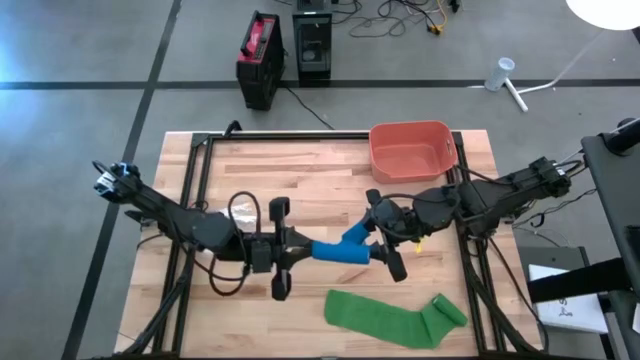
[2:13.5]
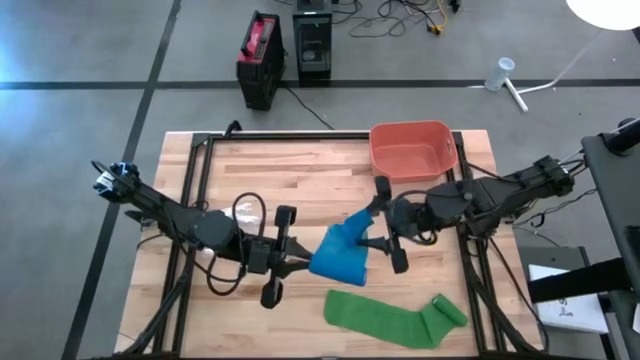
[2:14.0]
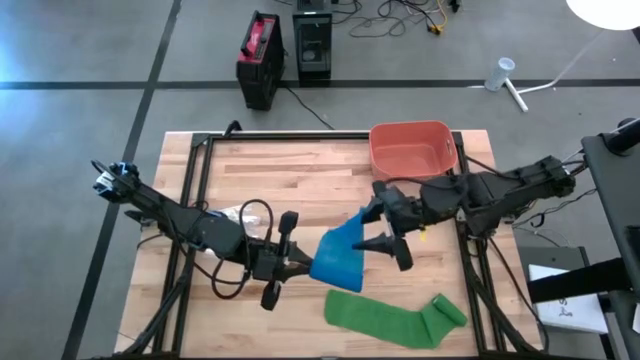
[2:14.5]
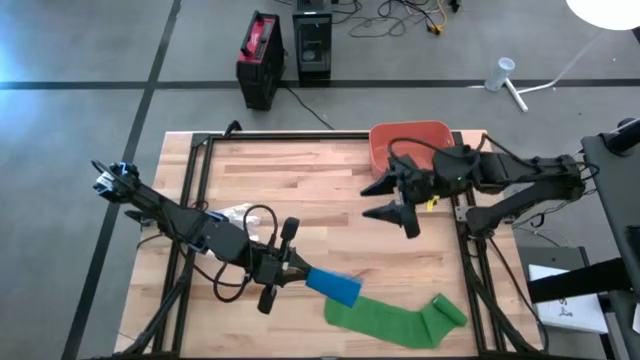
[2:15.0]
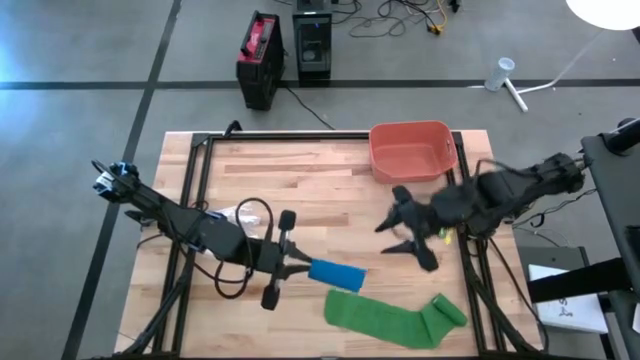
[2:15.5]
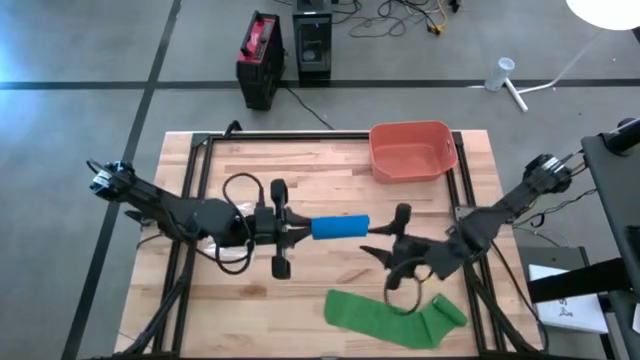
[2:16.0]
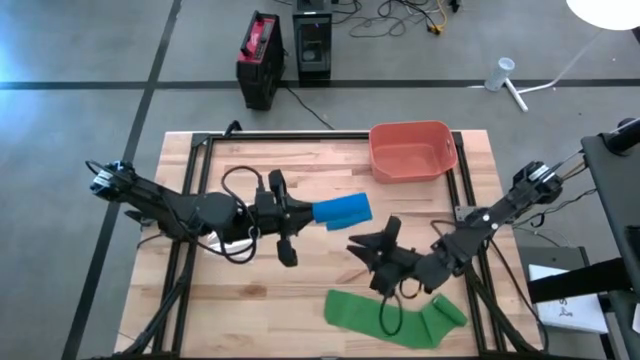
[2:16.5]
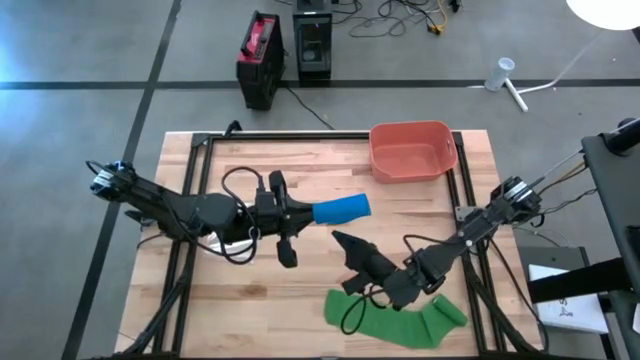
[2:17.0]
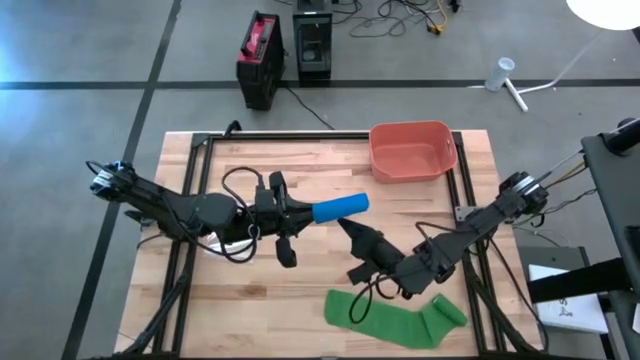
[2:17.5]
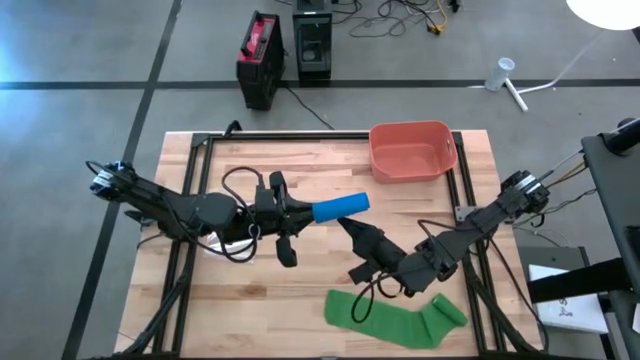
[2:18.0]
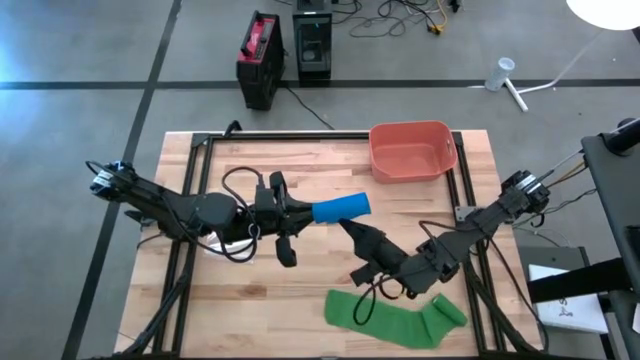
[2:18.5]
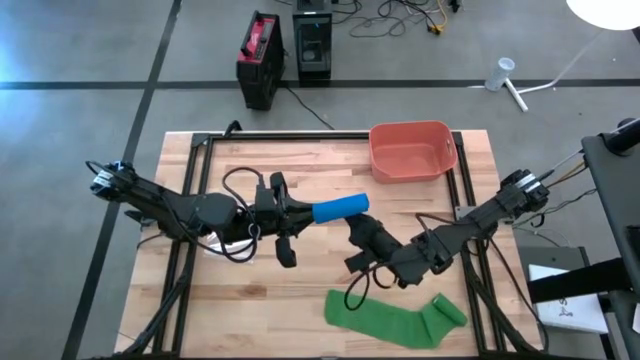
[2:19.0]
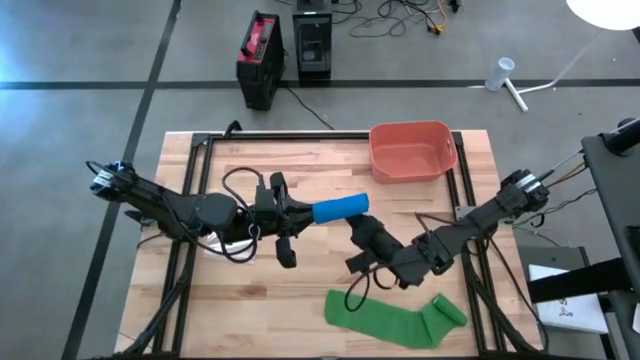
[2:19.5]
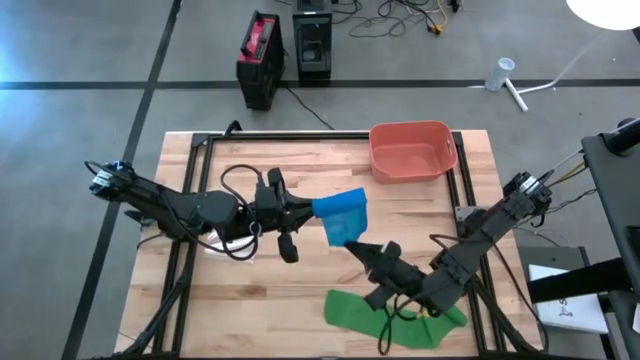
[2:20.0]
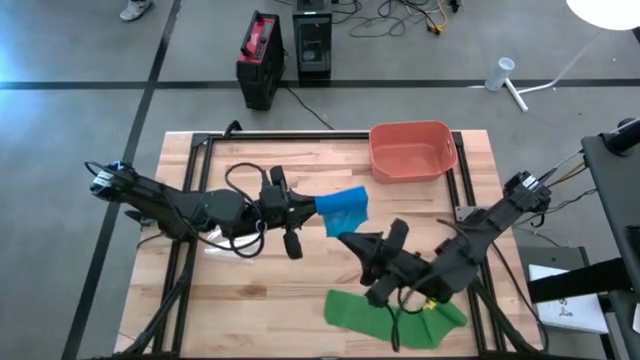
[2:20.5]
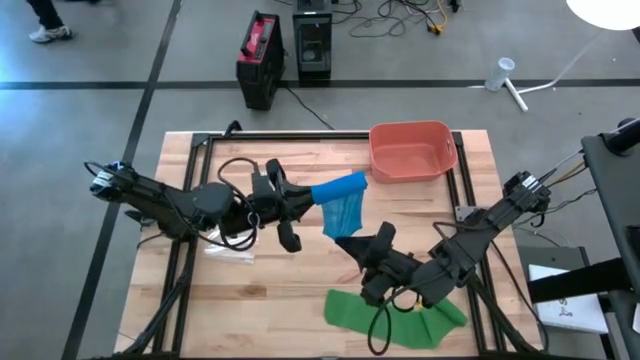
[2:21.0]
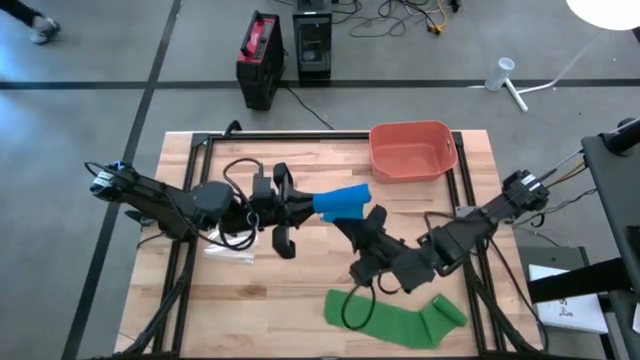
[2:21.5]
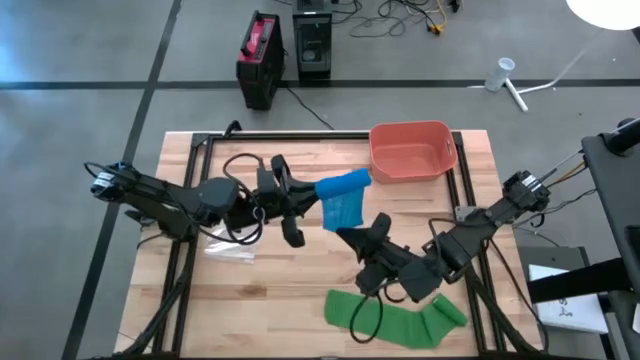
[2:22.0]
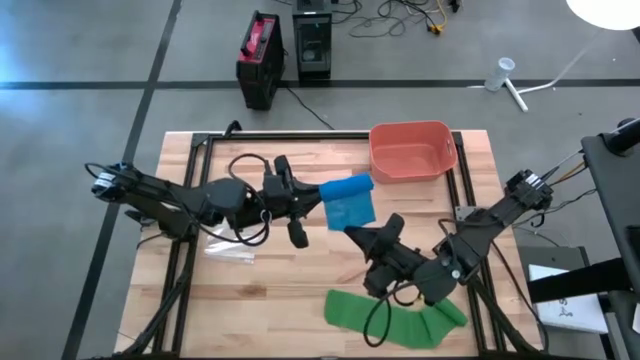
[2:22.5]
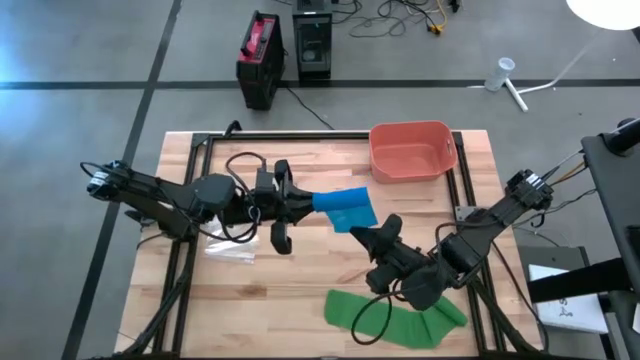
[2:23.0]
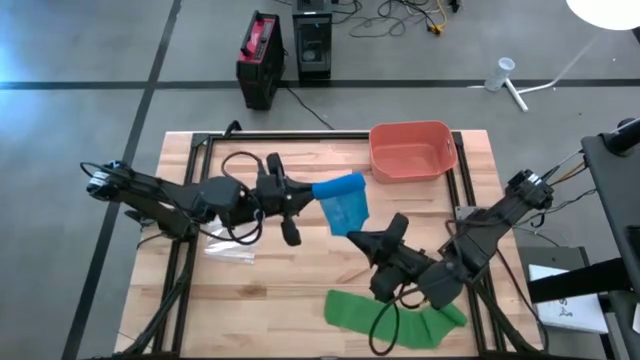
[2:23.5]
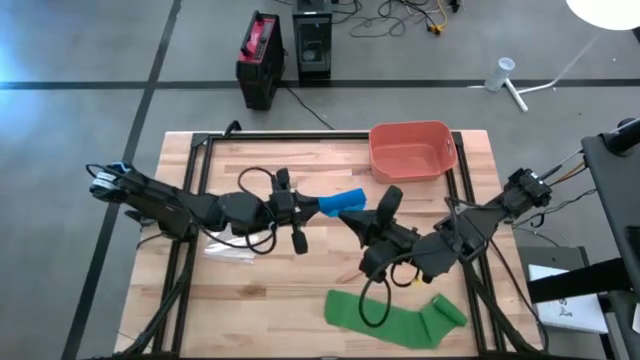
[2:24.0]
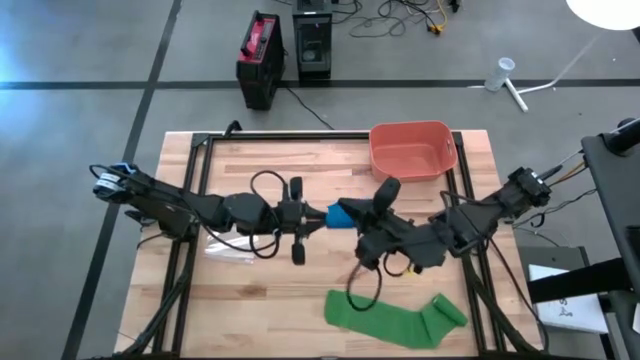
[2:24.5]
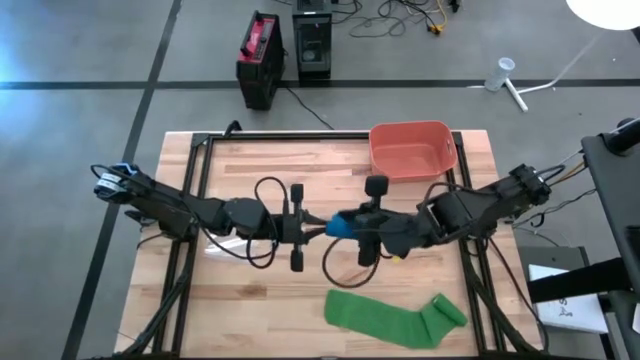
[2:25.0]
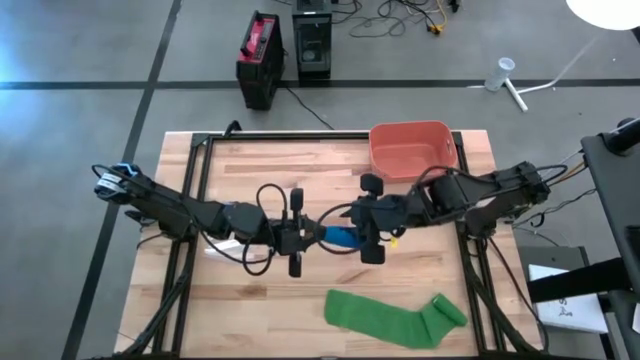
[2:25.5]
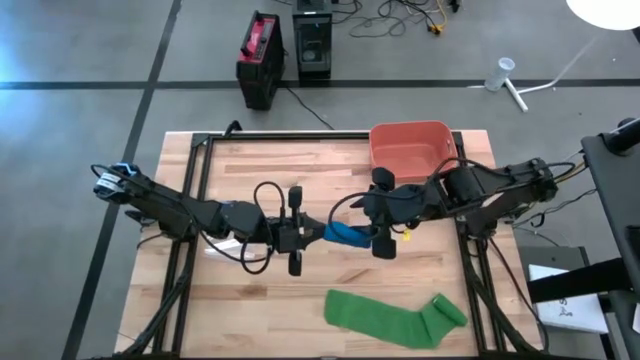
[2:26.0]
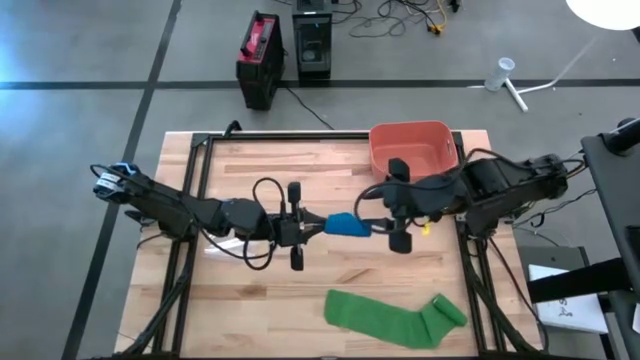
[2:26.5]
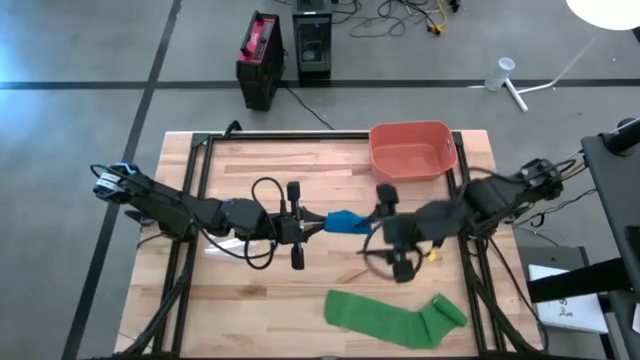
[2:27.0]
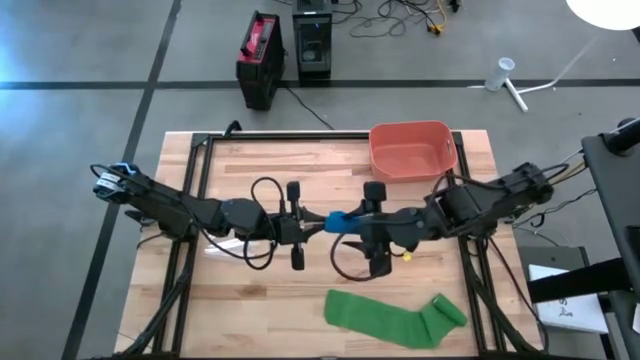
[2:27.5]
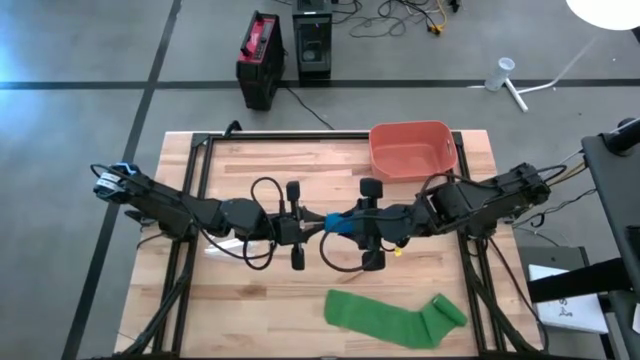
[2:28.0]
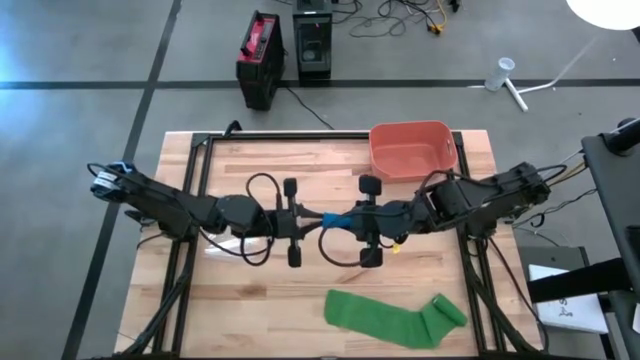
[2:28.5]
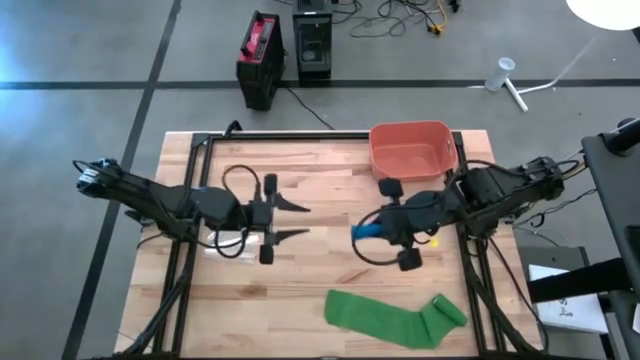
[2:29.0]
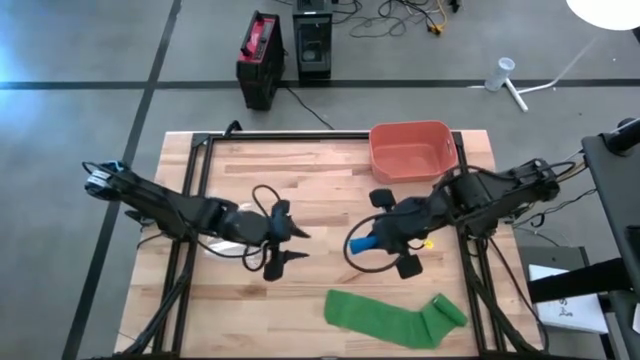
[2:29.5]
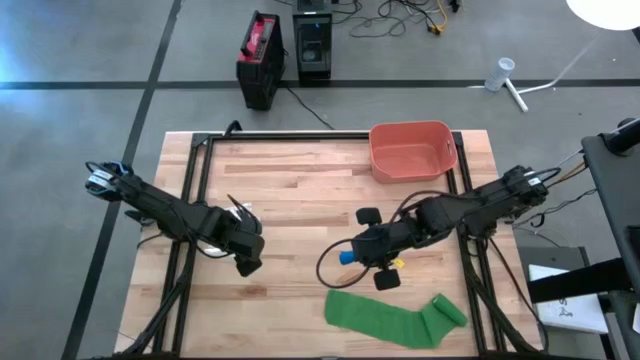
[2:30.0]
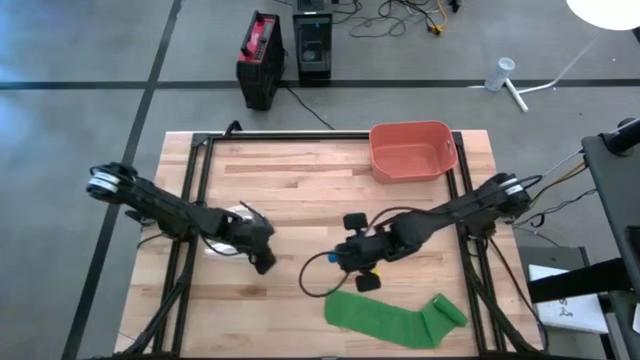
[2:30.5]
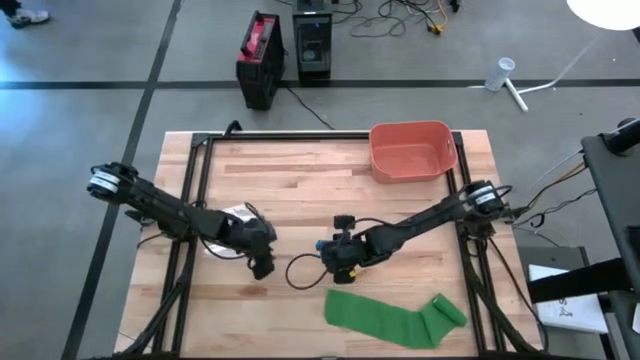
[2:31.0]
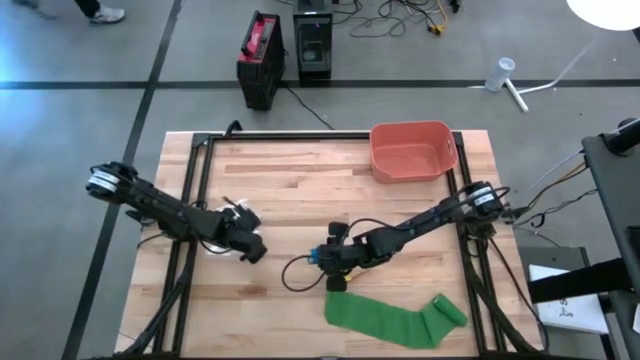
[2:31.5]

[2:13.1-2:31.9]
Task: Roll bandage
Roll the blue bandage

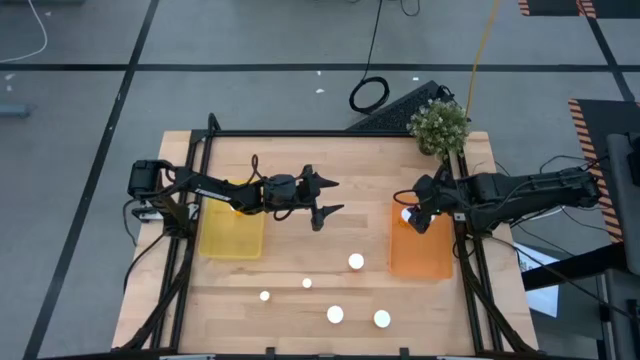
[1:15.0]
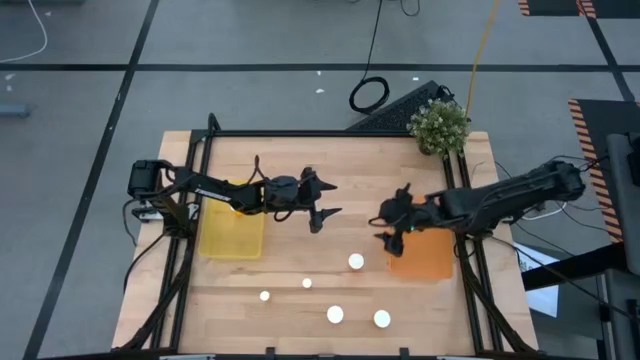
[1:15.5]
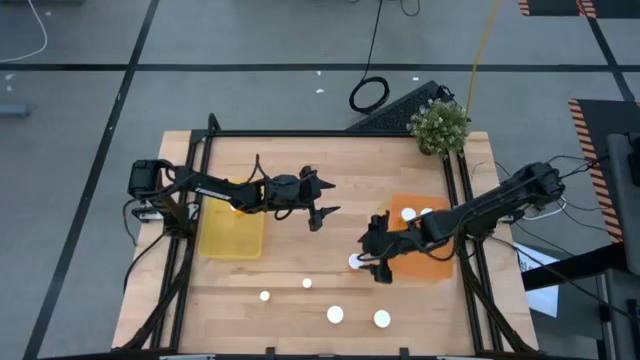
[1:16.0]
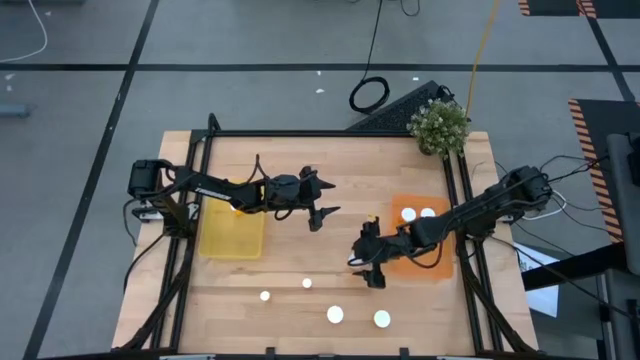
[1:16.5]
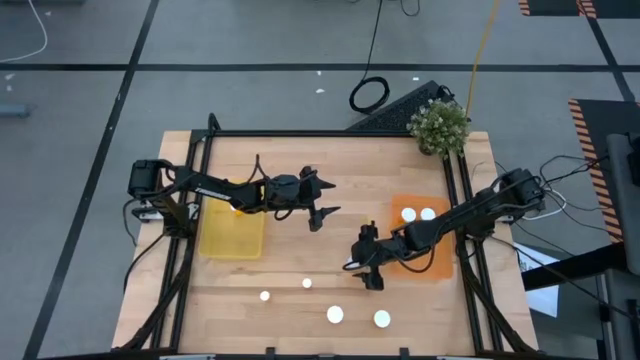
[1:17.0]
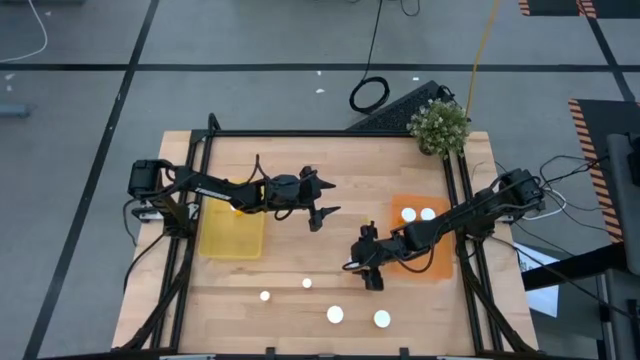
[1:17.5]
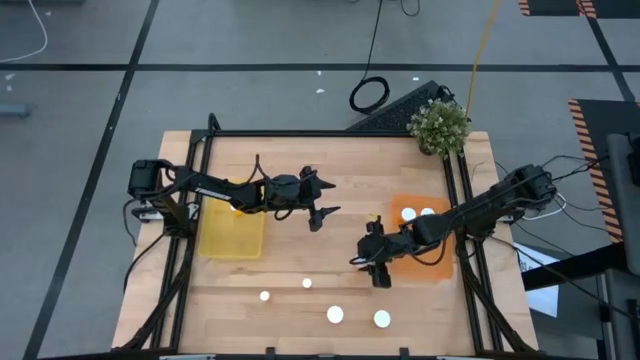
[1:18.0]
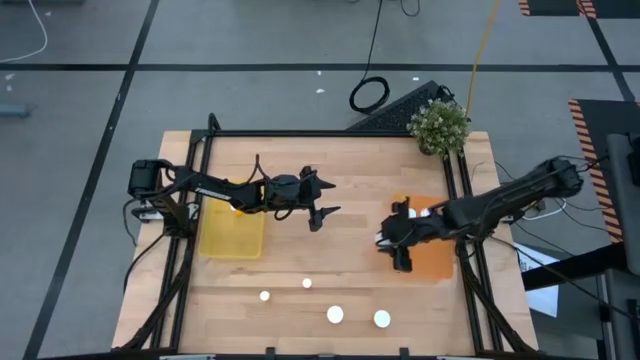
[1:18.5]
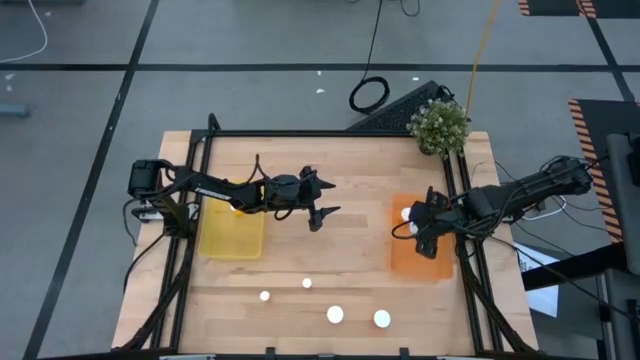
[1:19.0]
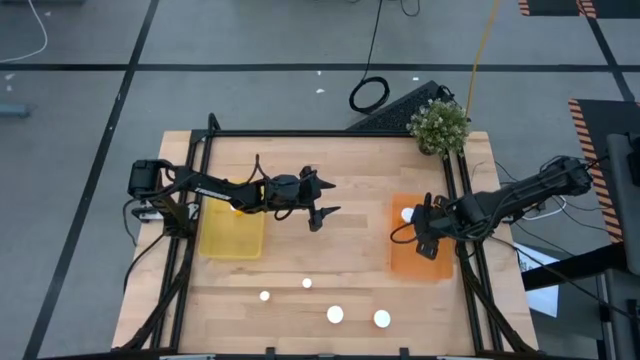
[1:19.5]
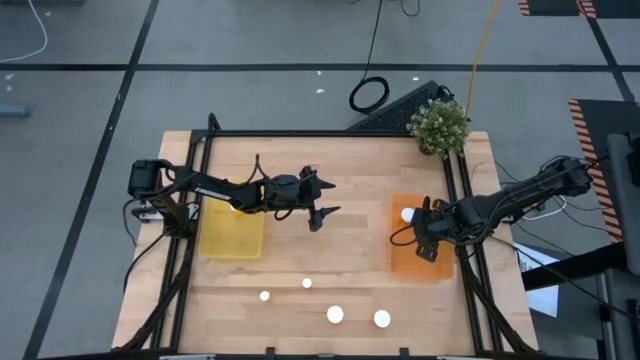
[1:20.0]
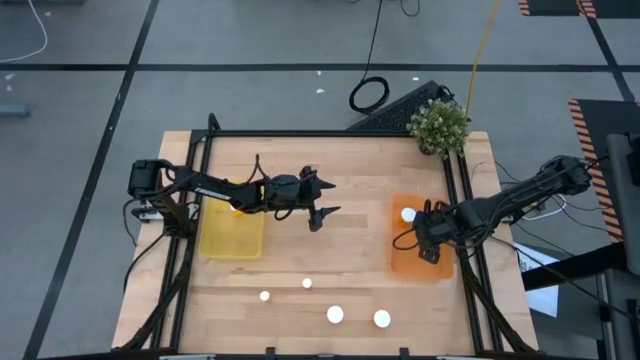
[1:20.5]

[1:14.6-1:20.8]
Task: Pick and place medicine bottles into bin by pill shape (circle, oval)
Put the large orange pill bottle into the orange bin
